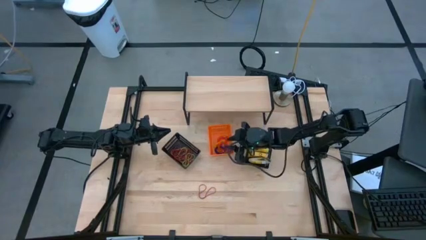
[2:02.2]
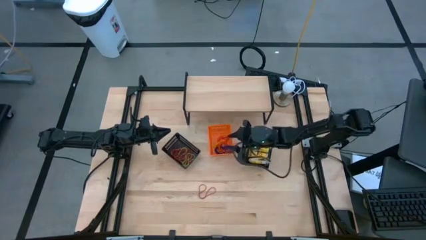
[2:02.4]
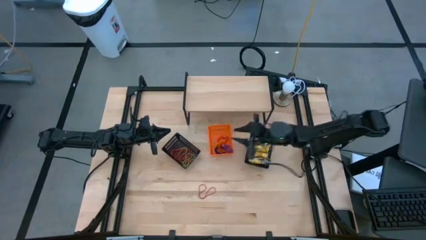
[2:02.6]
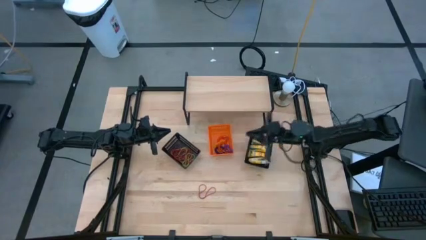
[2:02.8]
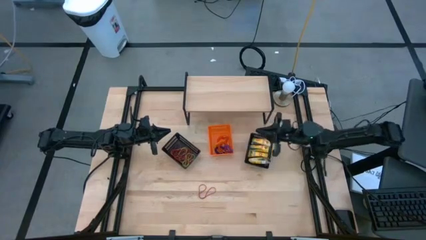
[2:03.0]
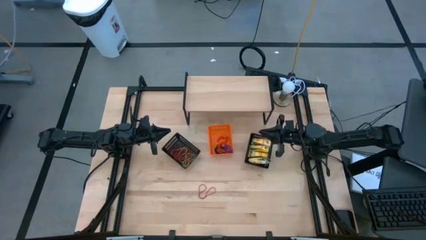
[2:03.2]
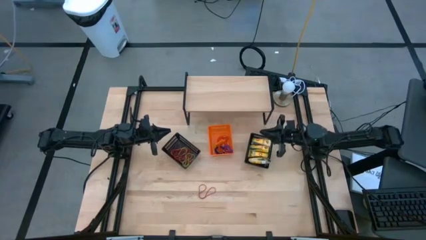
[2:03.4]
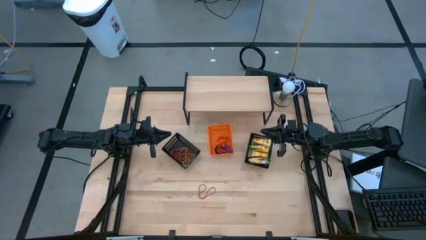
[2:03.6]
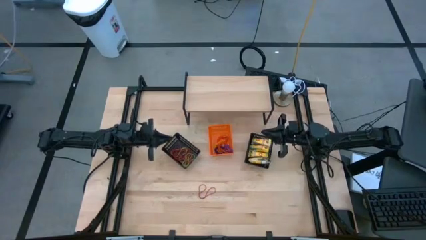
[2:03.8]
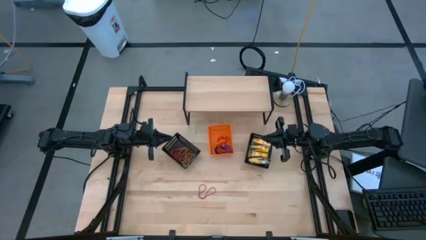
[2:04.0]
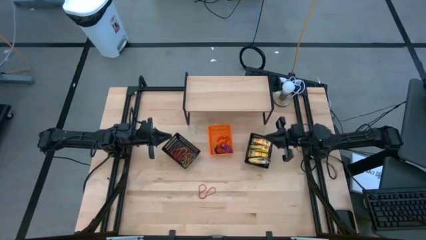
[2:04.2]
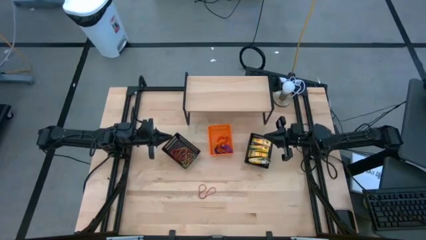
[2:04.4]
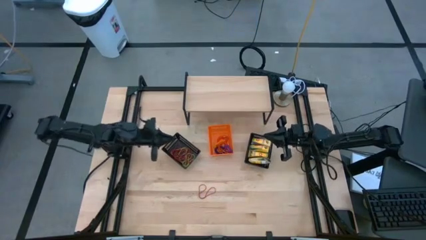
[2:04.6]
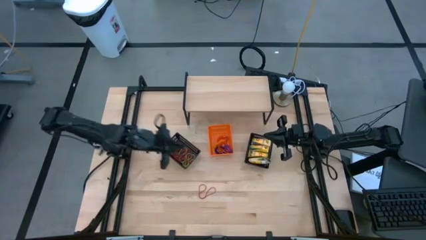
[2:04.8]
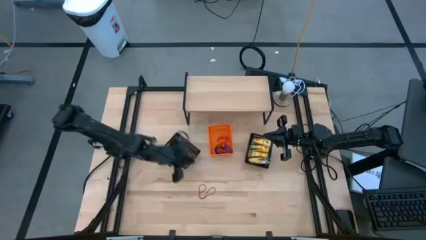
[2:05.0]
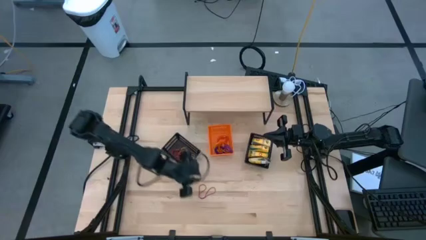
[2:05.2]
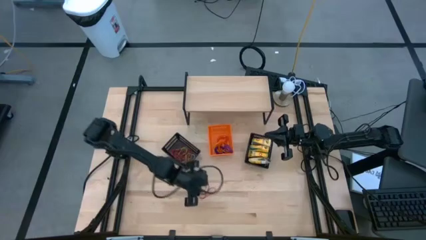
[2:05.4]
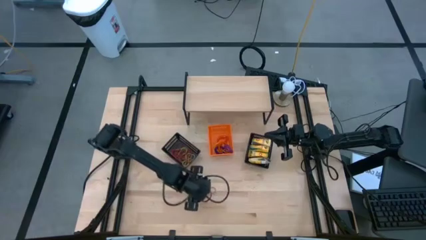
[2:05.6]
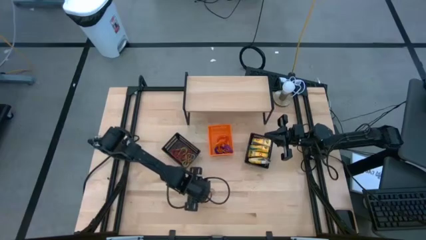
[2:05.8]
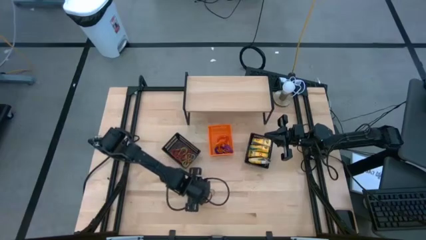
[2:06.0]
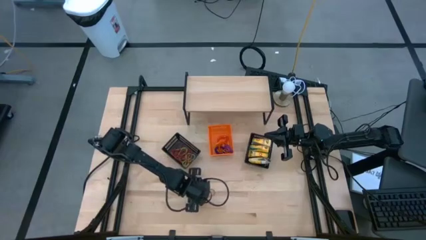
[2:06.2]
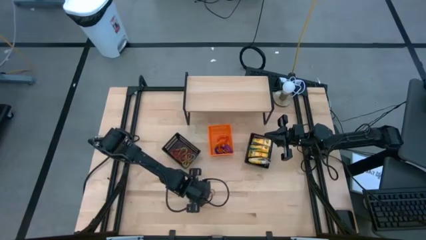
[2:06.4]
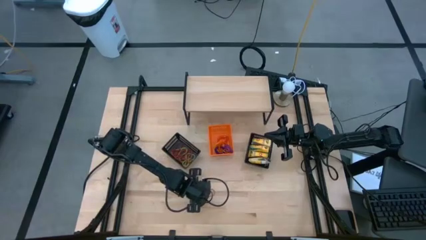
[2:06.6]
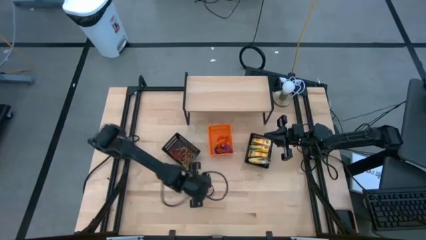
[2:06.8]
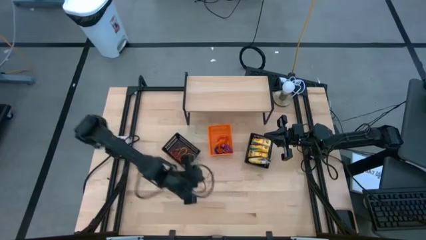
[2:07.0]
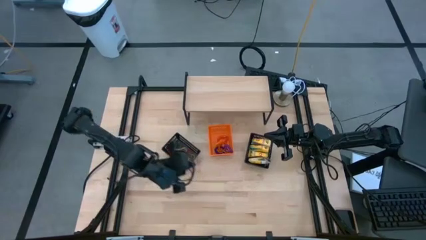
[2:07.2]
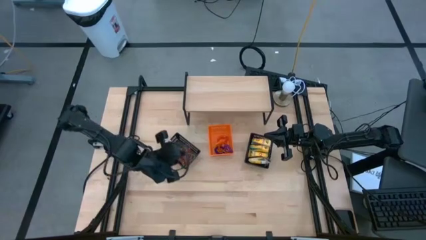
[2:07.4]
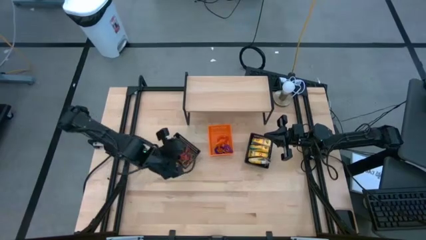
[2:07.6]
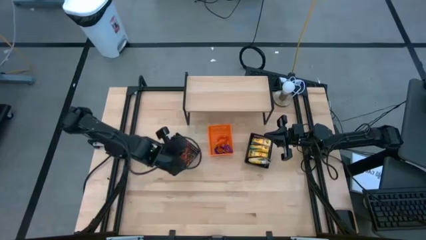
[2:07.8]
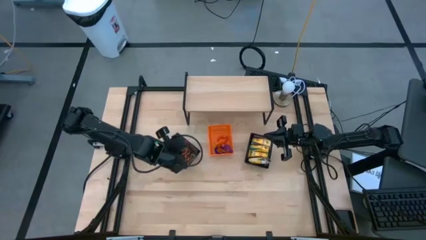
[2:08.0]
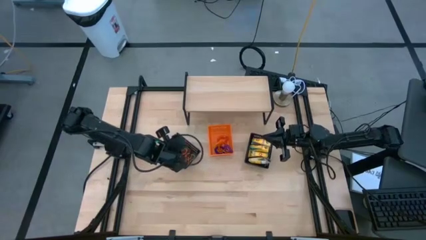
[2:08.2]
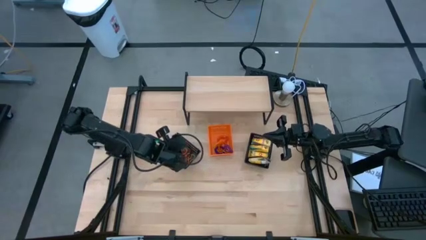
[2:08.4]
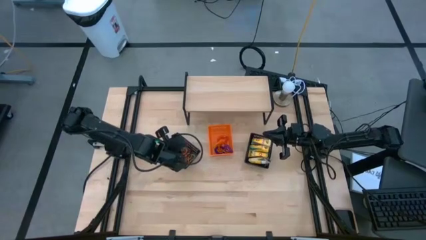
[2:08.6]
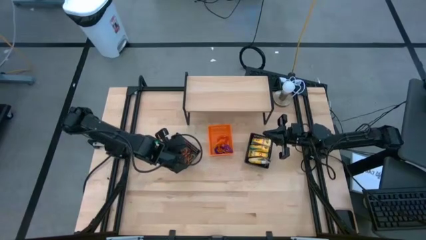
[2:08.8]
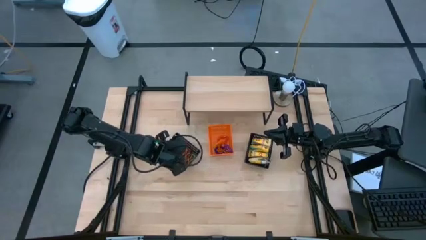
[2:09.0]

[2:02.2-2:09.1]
Task: Pick & Place Office Desk Supplies
Put the red rubber band into the left black bin

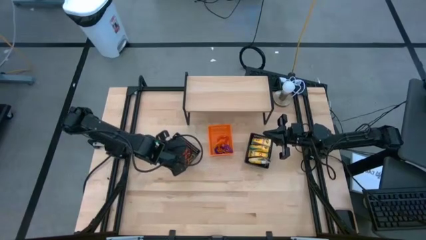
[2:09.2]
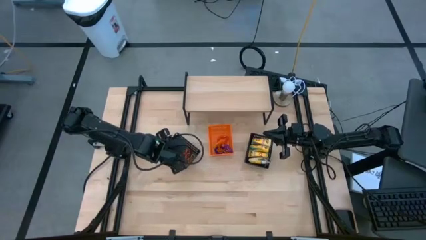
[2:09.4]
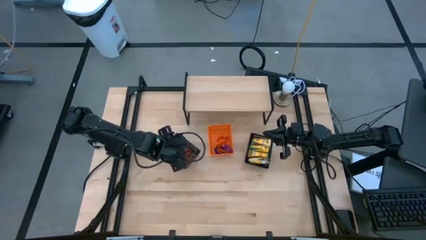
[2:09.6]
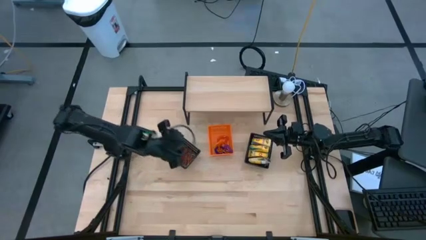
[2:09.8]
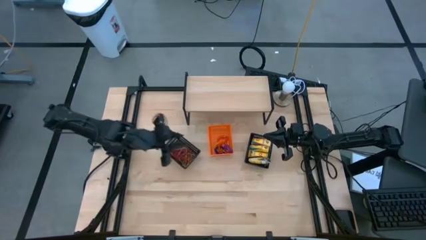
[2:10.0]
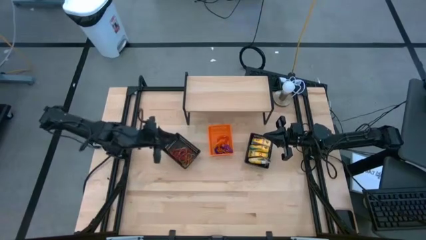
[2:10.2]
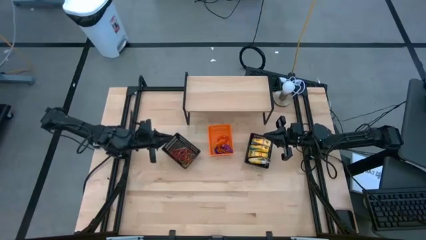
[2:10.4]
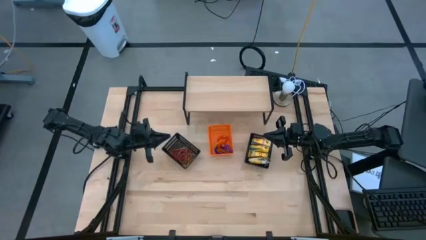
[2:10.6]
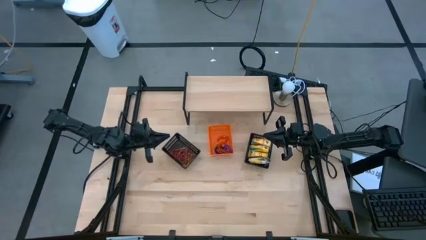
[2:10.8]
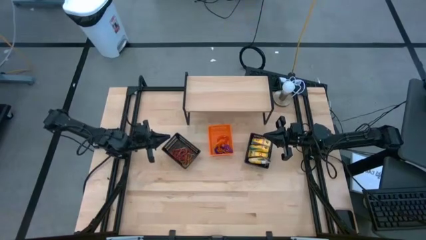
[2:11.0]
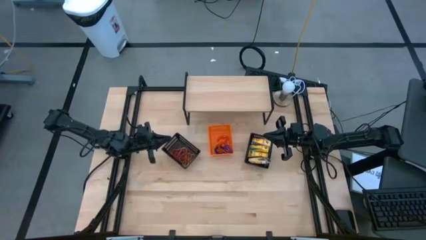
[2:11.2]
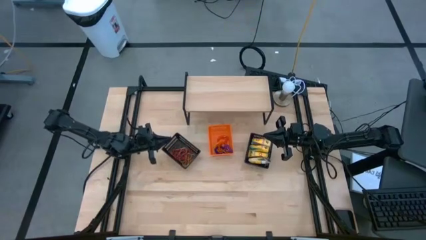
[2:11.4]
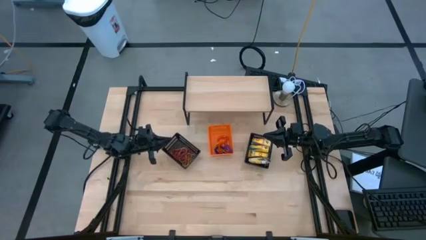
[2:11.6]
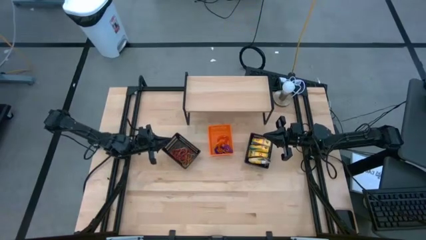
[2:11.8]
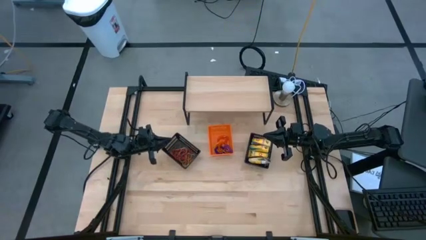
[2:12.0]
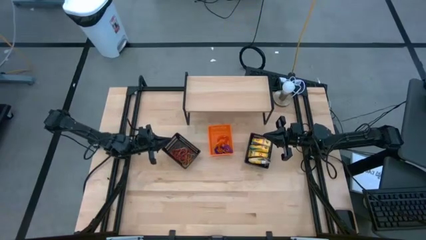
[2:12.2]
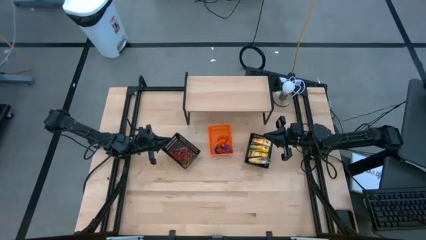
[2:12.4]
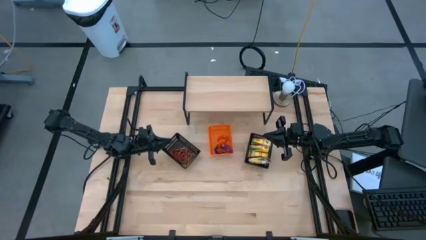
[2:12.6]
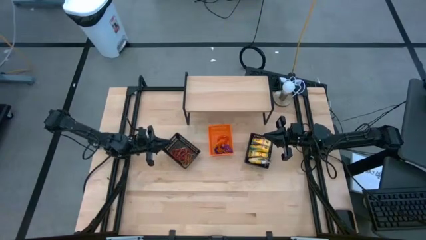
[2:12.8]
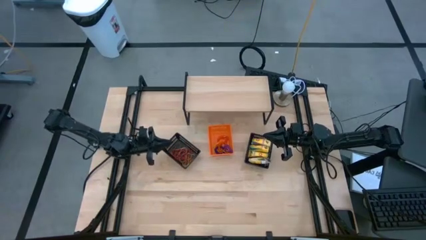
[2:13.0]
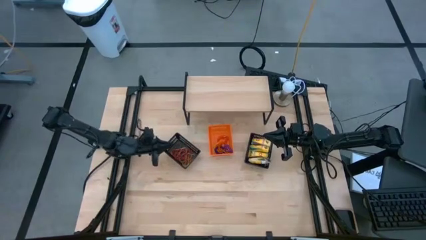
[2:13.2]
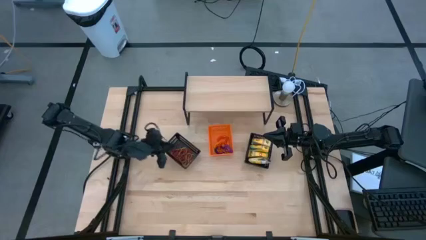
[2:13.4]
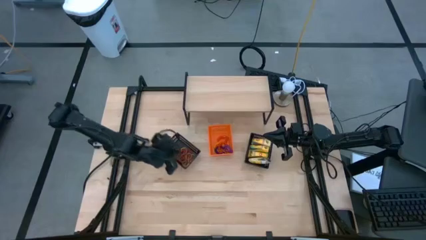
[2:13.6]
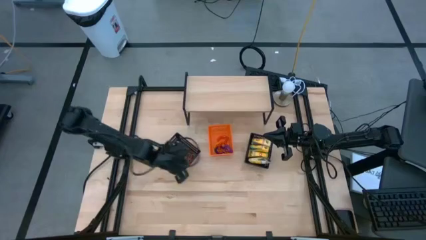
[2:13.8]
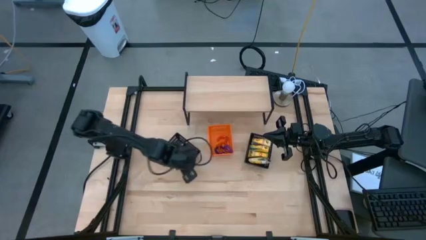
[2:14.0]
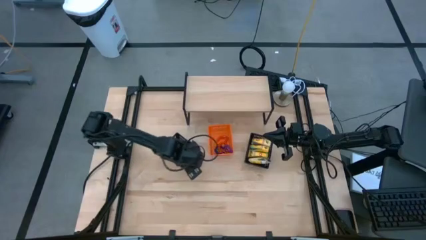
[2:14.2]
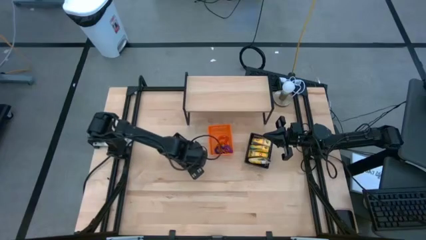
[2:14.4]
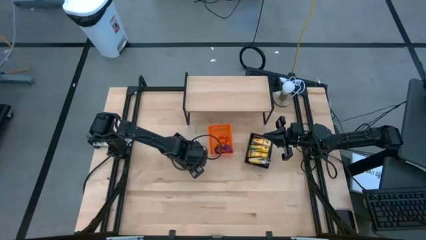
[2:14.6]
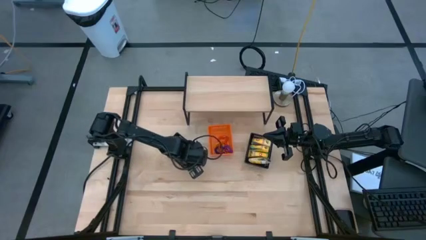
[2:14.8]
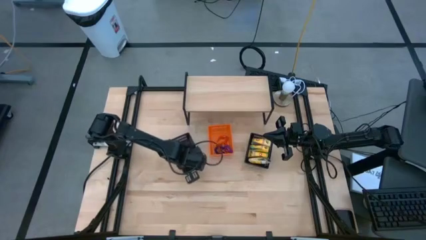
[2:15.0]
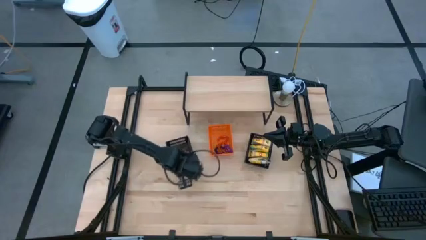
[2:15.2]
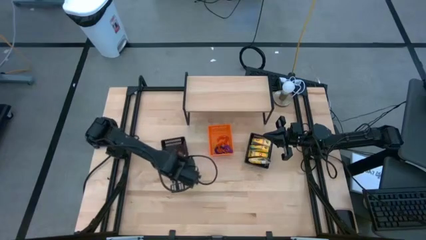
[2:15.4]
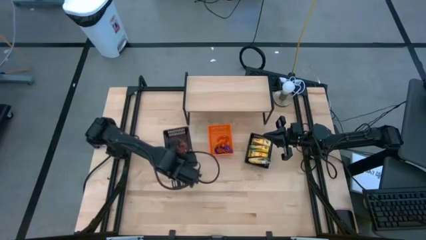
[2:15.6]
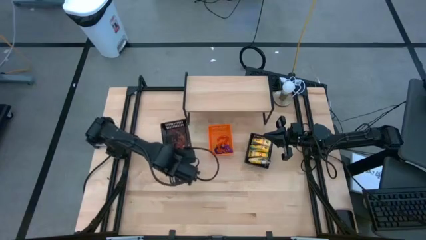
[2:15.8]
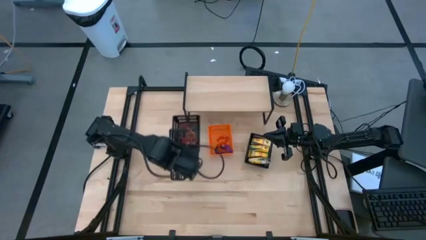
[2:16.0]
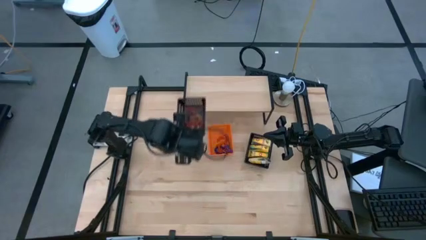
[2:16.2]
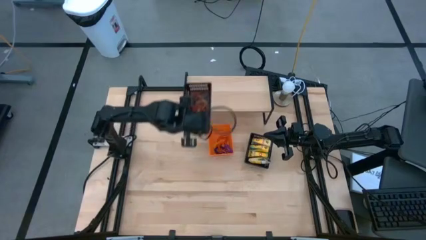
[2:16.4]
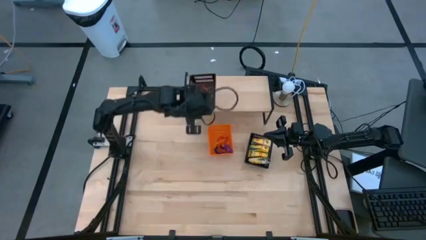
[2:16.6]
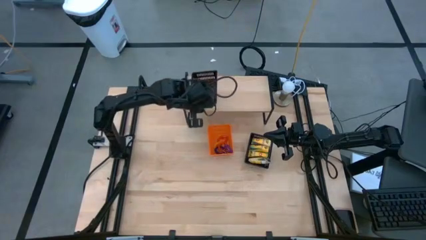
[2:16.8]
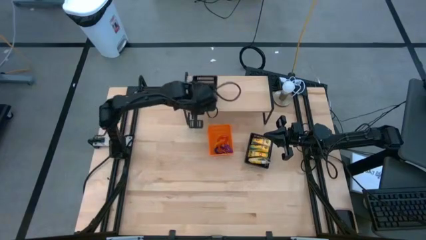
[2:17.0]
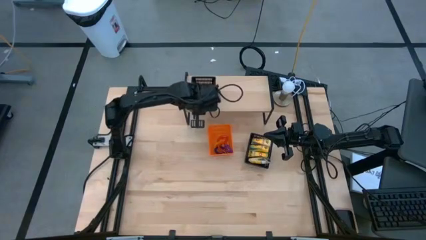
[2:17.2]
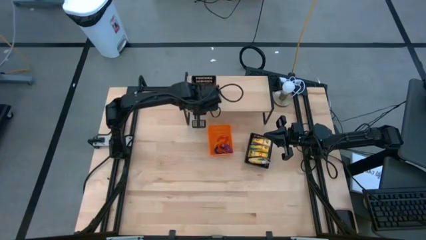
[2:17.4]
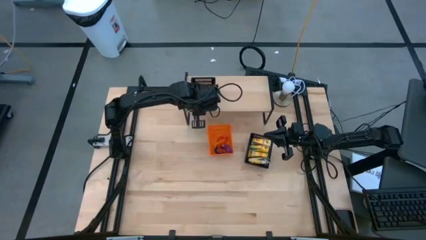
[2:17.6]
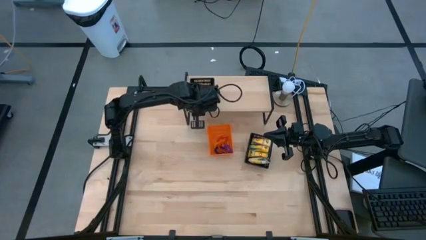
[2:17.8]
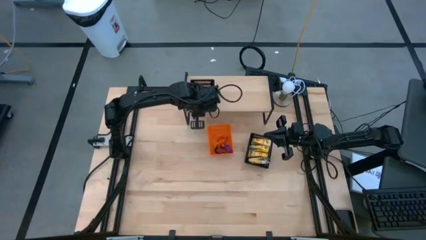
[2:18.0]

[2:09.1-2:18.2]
Put the left black bin on the shelf
